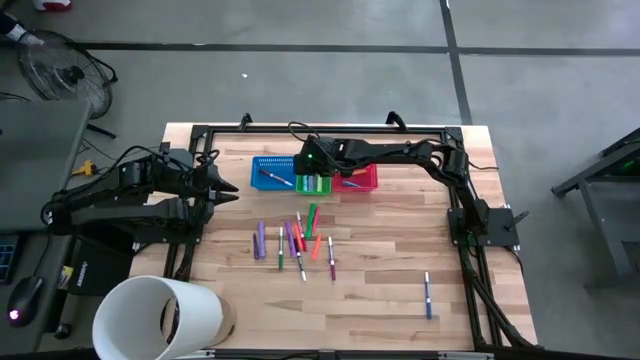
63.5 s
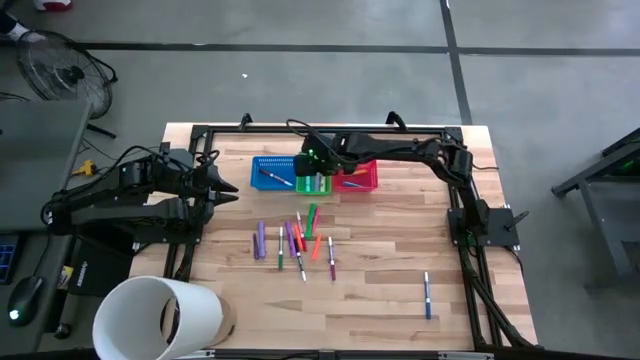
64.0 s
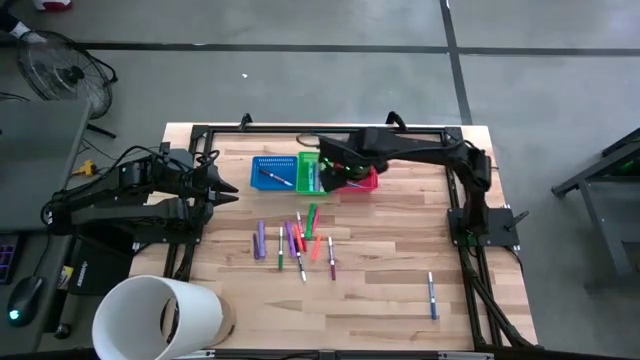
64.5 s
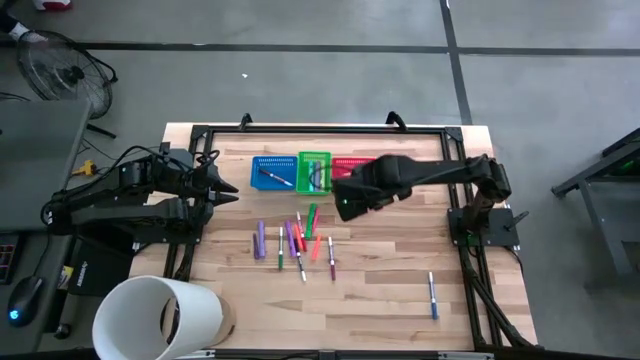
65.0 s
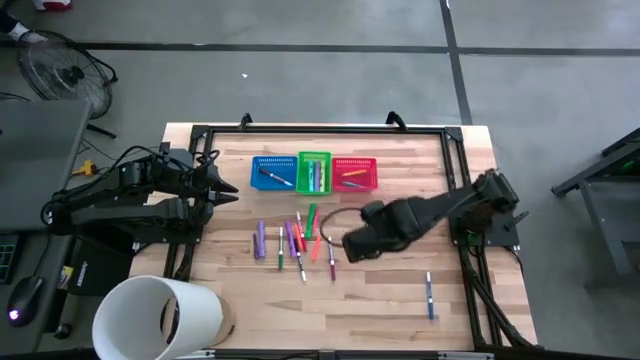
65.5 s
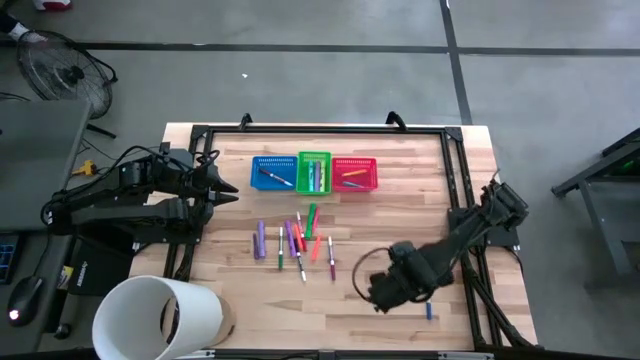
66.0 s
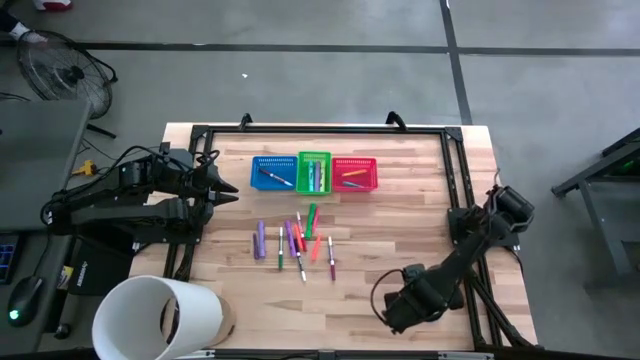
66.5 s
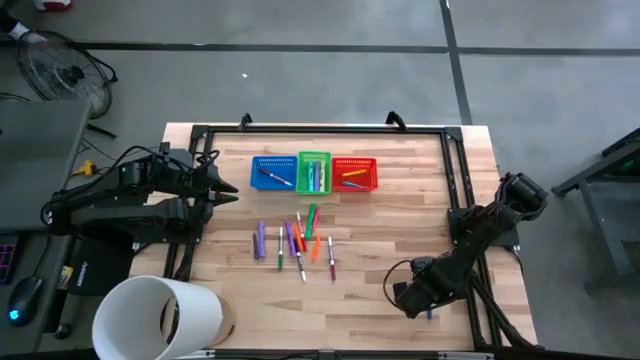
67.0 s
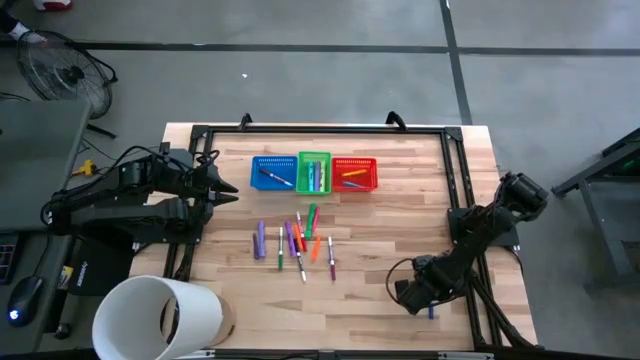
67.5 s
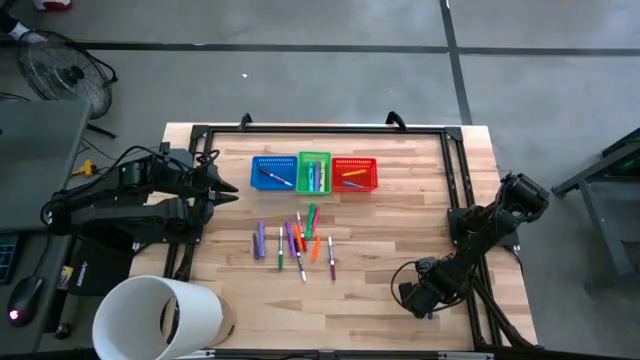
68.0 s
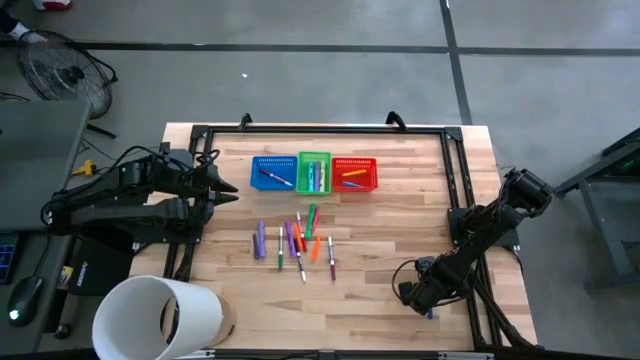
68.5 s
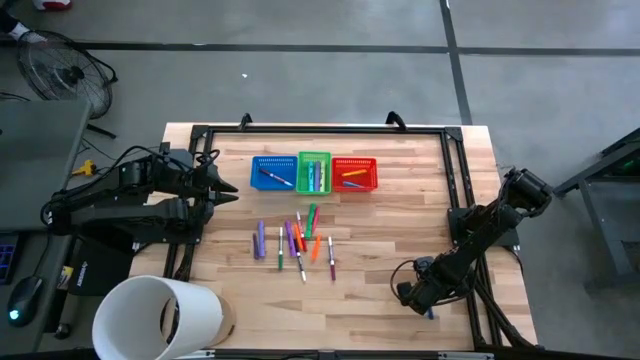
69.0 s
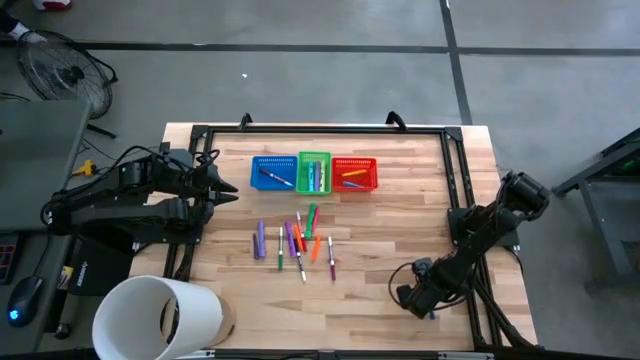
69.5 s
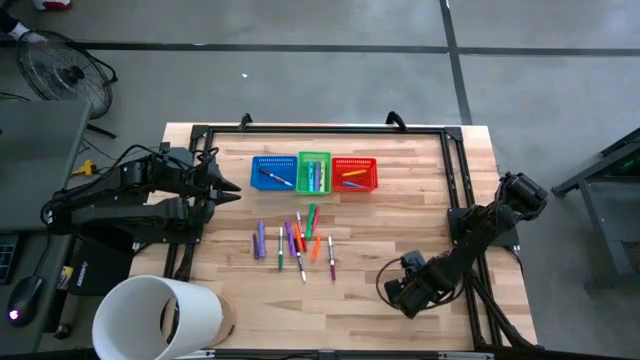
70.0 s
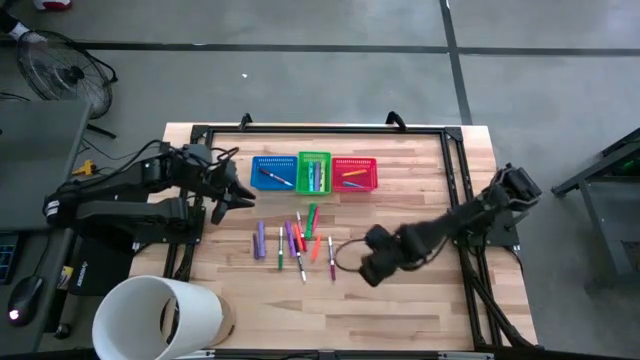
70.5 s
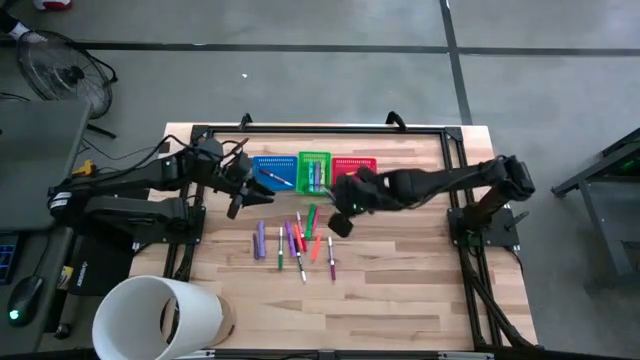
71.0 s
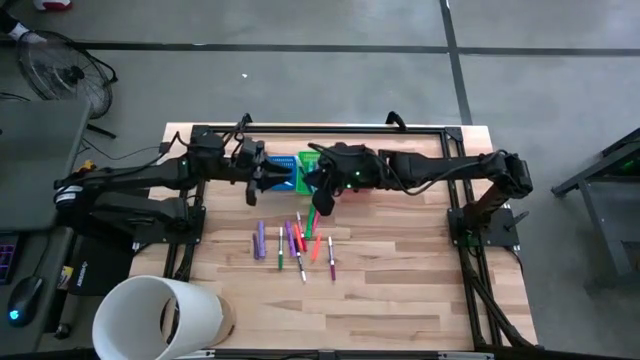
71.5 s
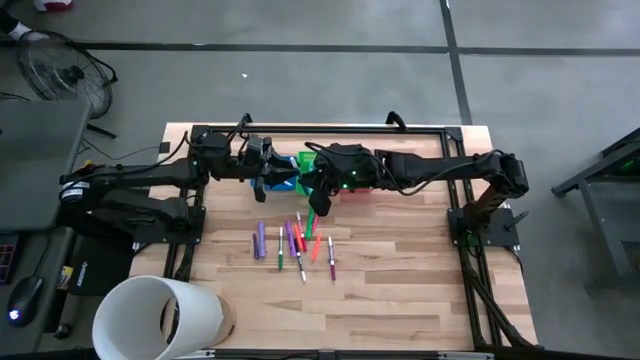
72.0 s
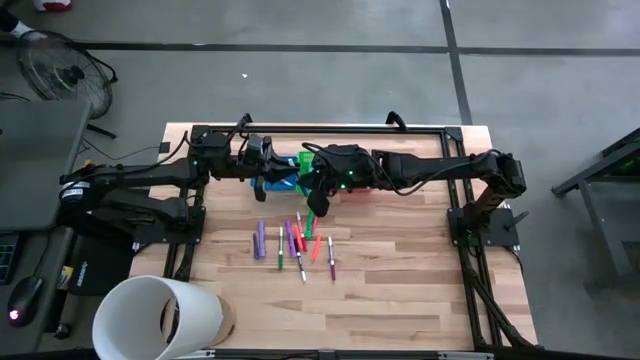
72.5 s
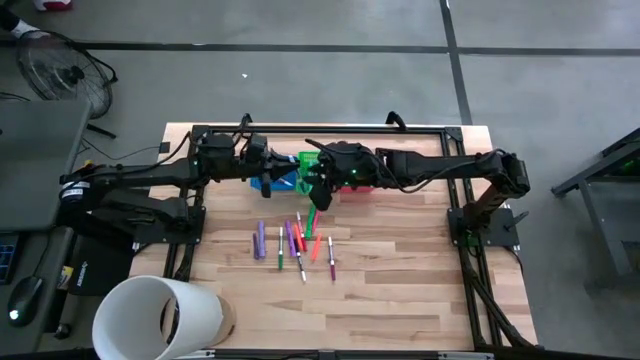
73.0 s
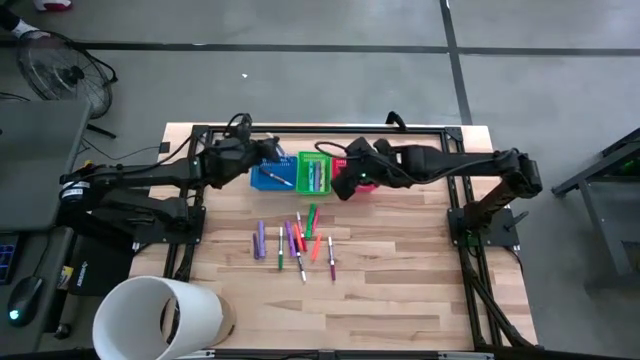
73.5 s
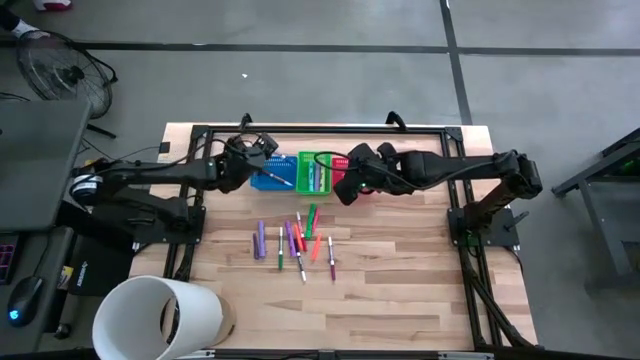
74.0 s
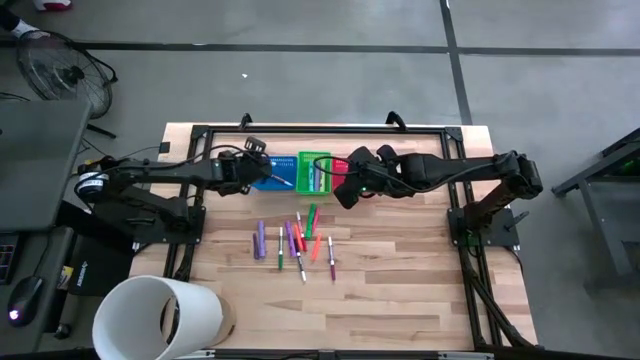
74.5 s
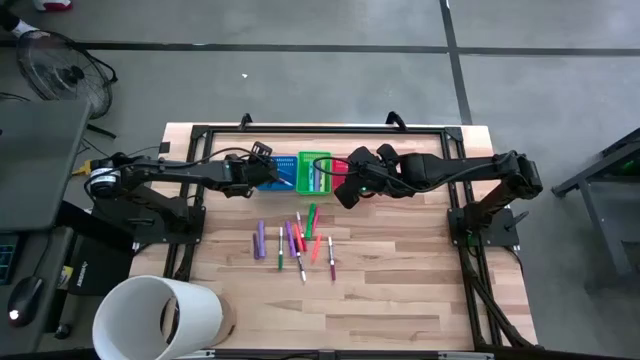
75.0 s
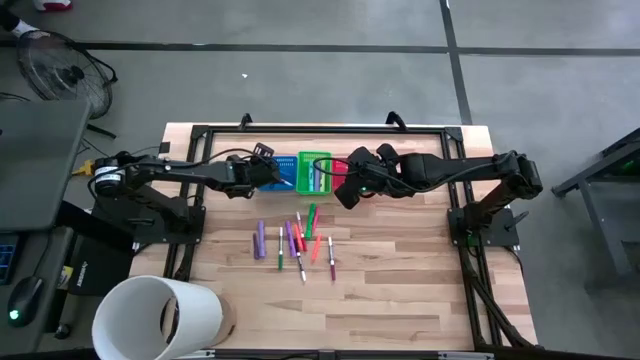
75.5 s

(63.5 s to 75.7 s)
Task: Pick & Place Markers
Put the blue marker into the blue bin

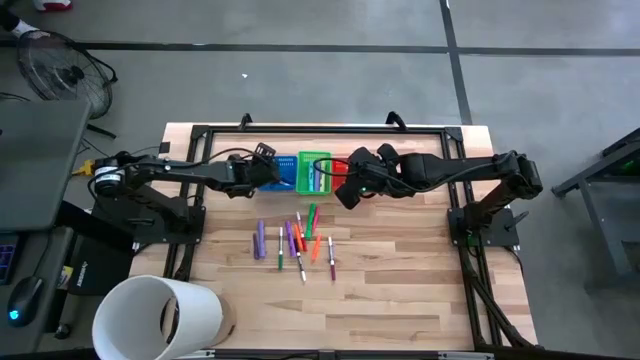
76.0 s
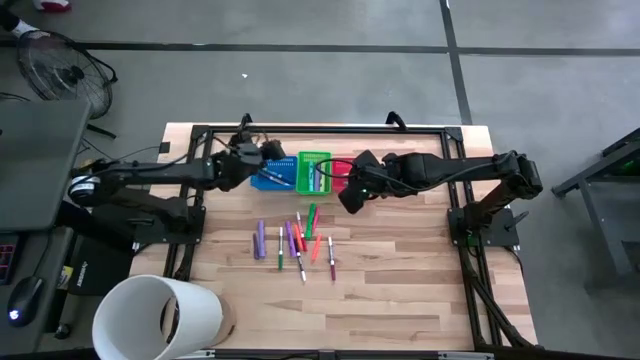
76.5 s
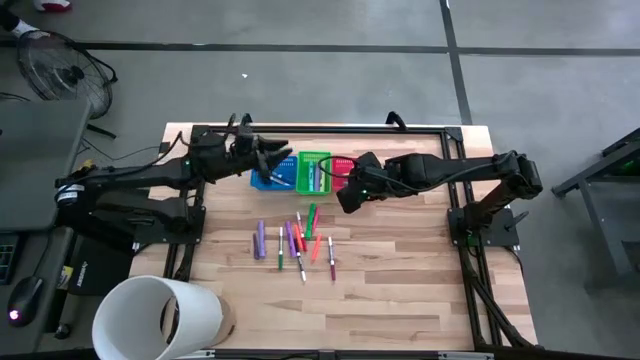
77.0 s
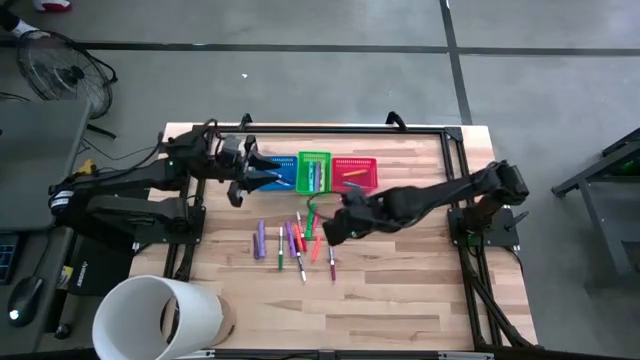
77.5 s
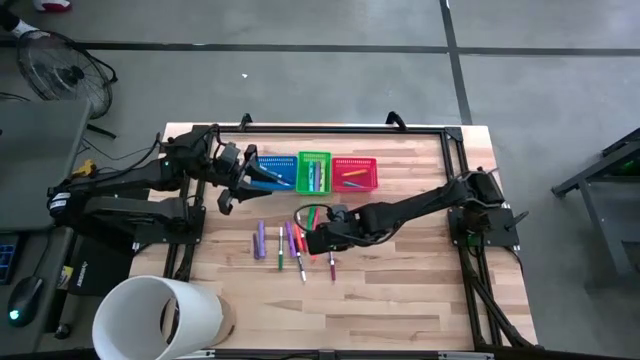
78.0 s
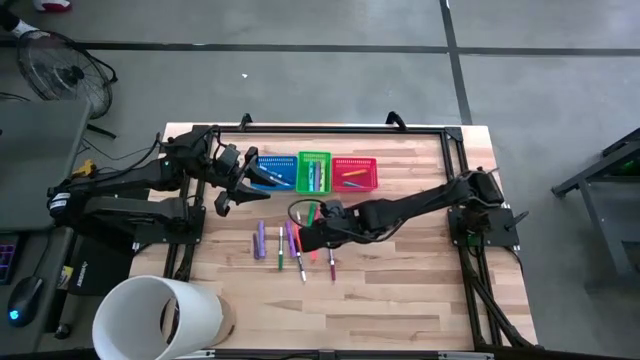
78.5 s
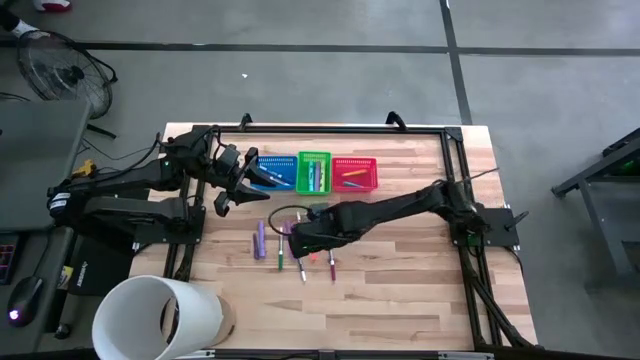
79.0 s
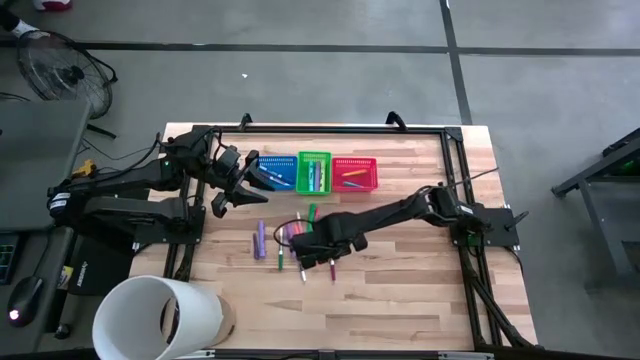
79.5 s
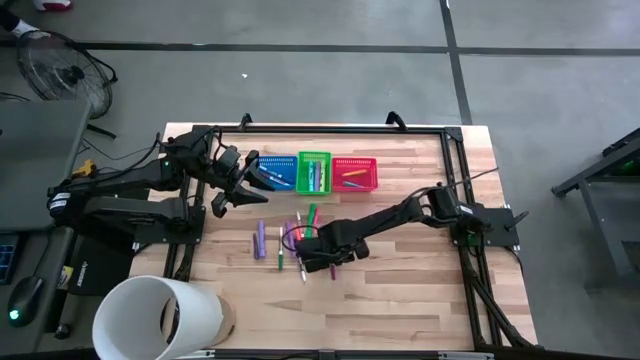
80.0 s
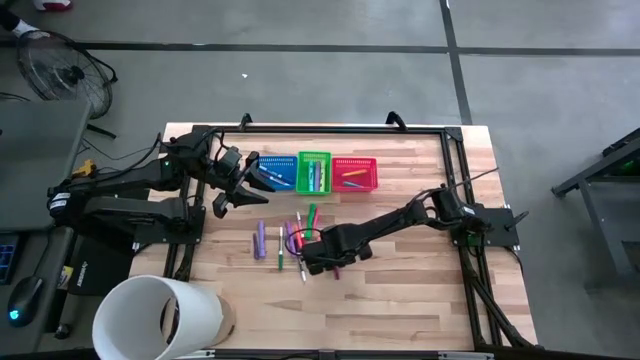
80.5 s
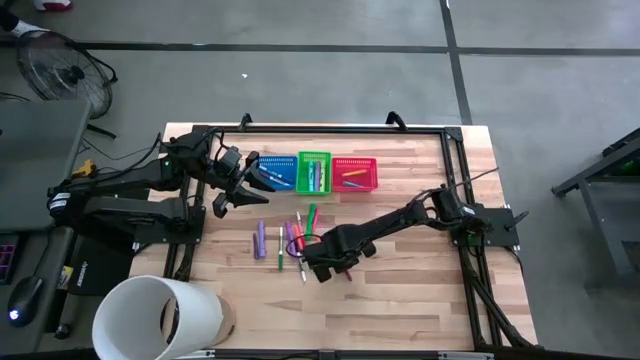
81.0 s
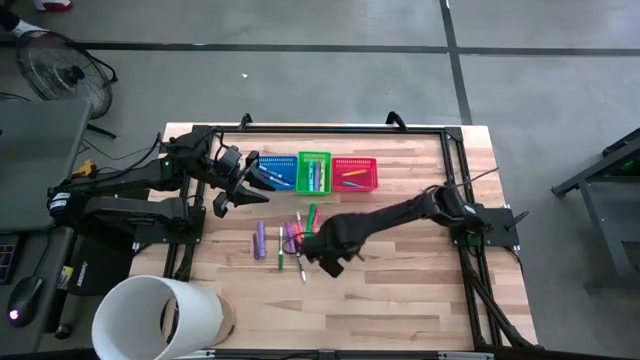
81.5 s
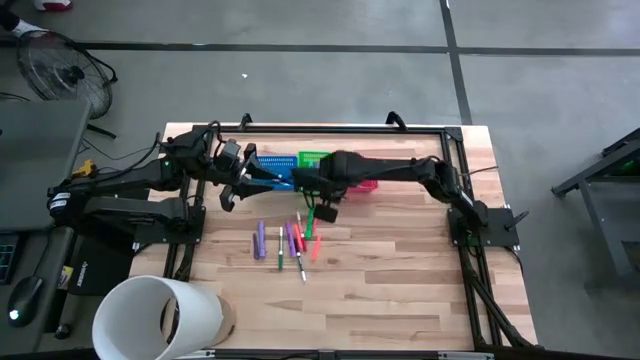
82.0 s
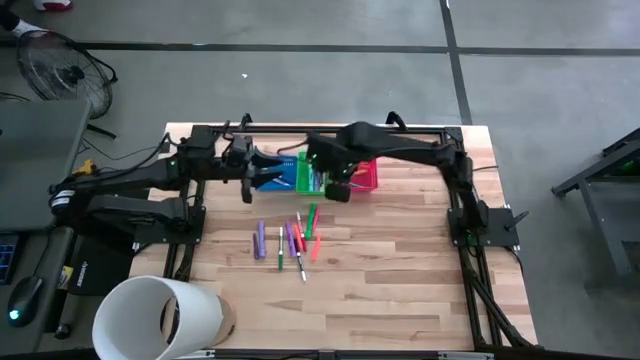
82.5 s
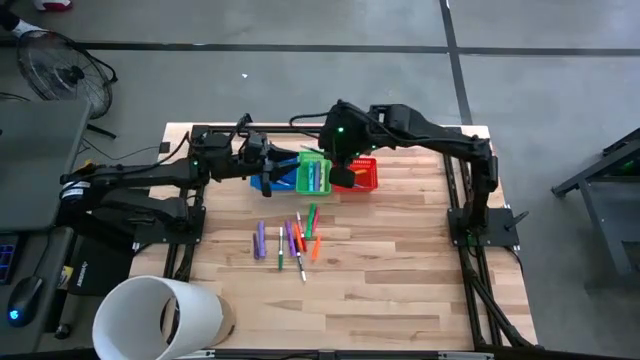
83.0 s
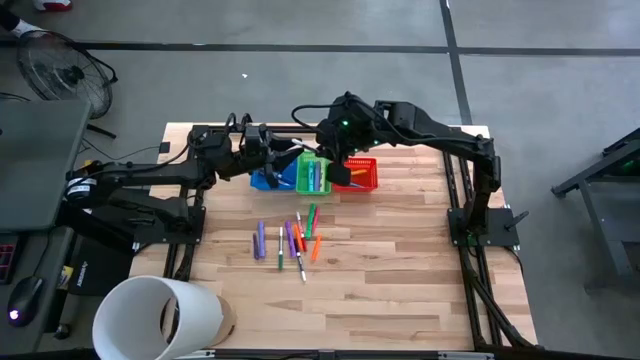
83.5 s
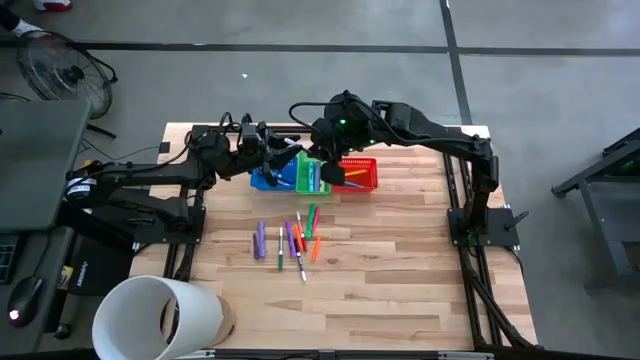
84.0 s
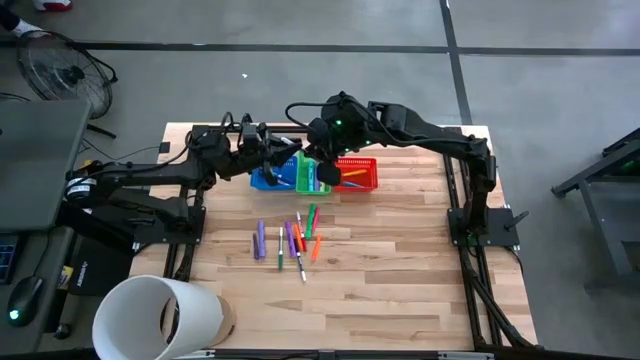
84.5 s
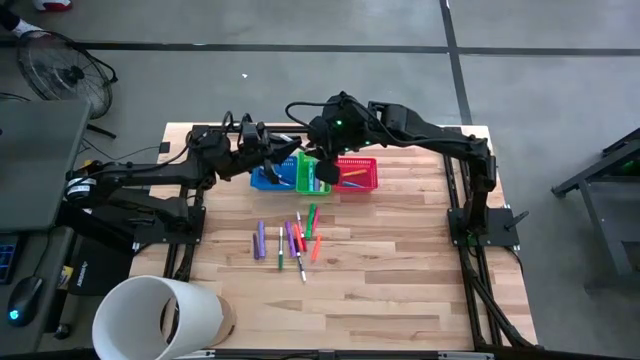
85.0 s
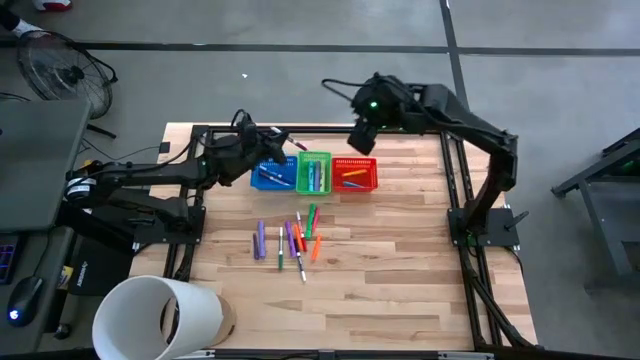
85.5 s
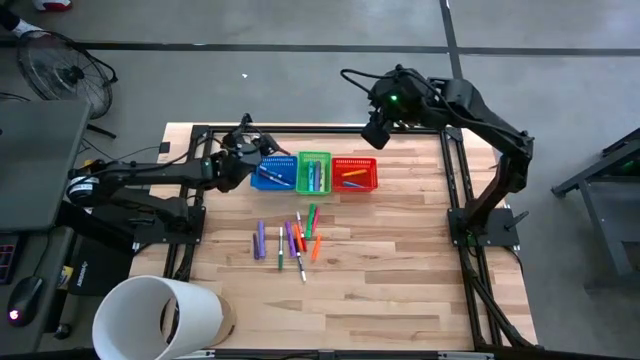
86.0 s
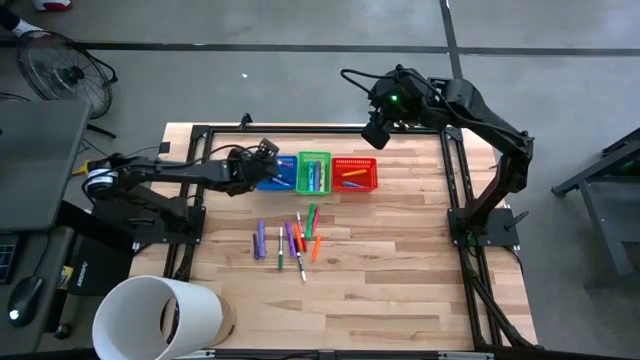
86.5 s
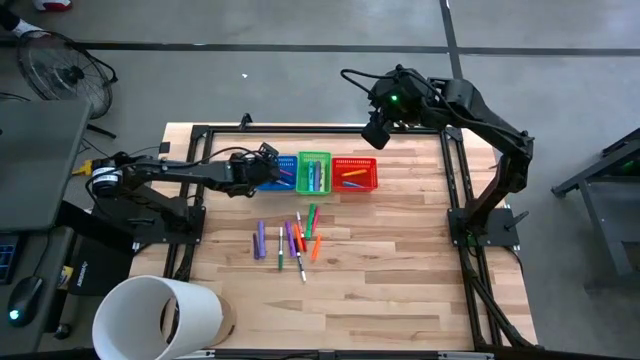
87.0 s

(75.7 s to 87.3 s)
Put the purple marker into the blue bin
